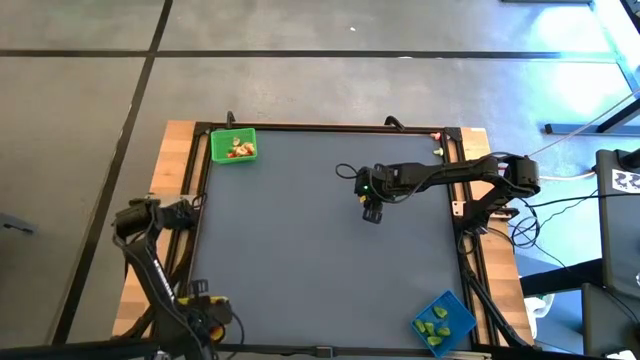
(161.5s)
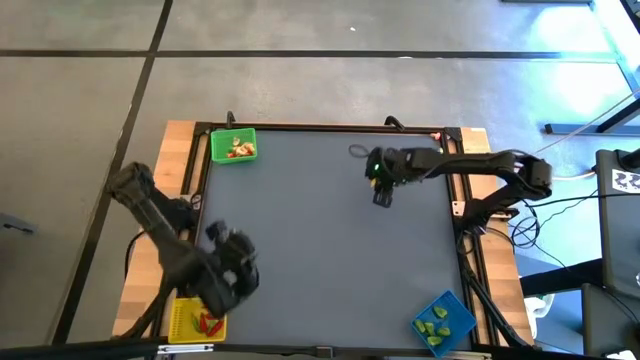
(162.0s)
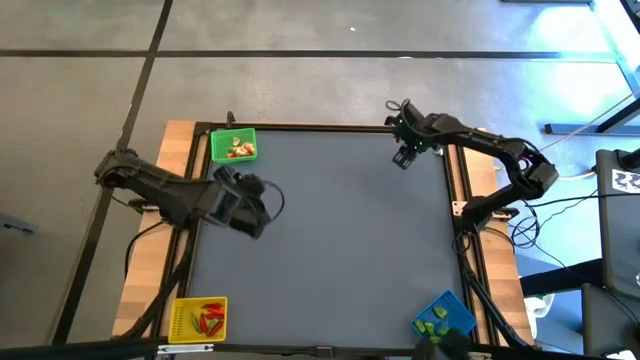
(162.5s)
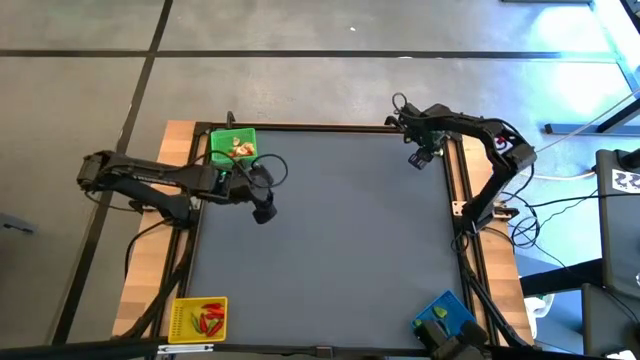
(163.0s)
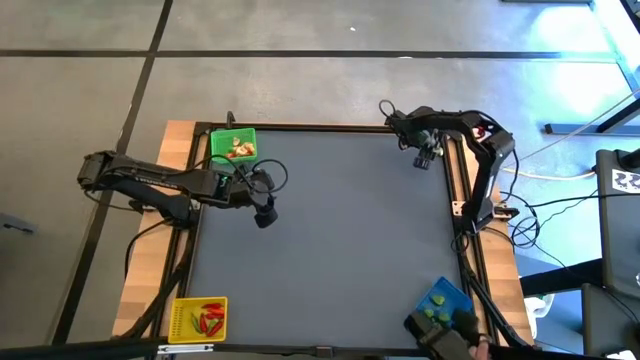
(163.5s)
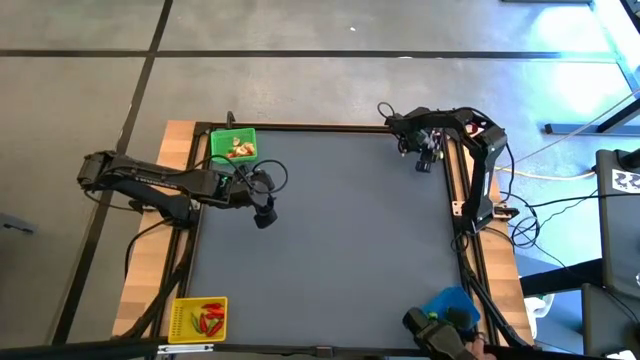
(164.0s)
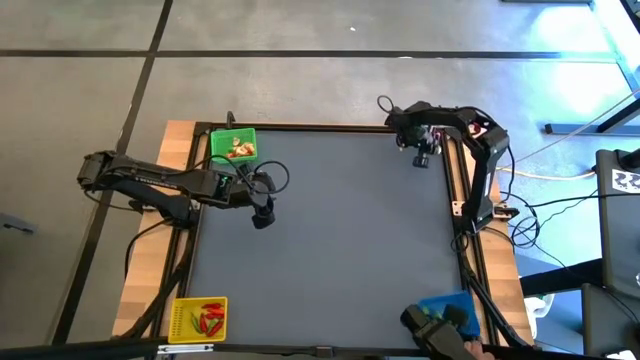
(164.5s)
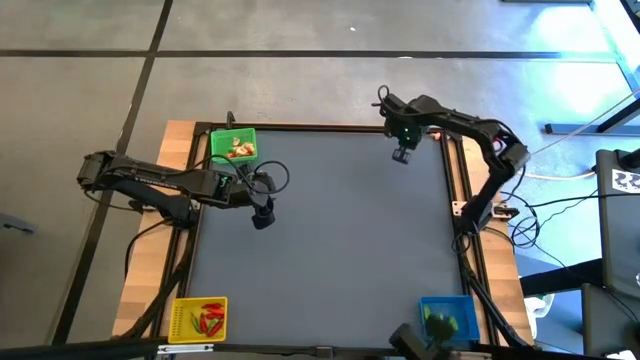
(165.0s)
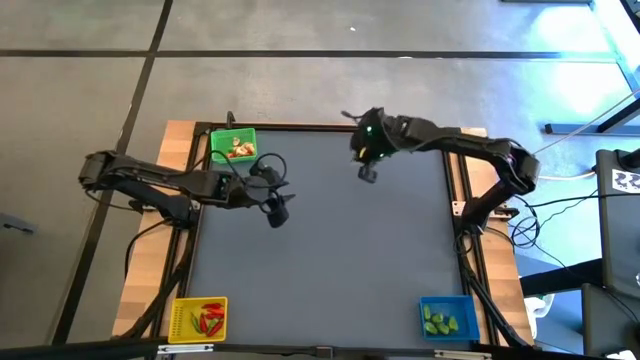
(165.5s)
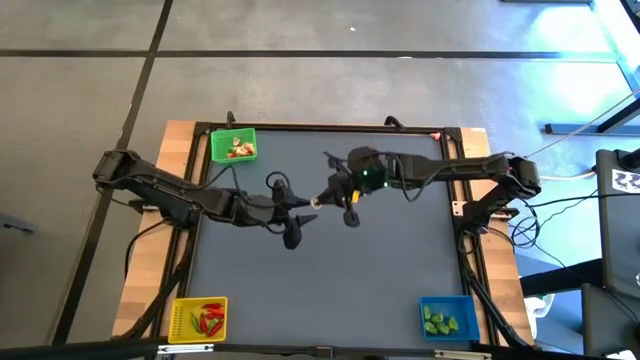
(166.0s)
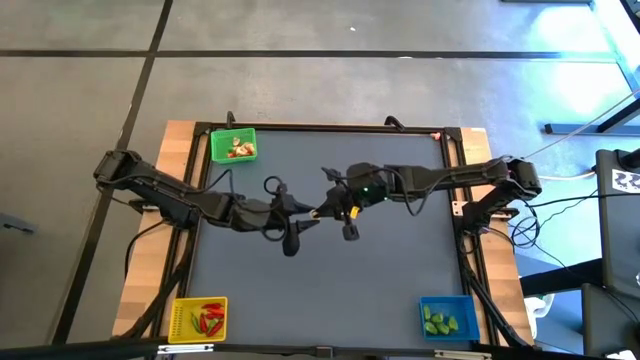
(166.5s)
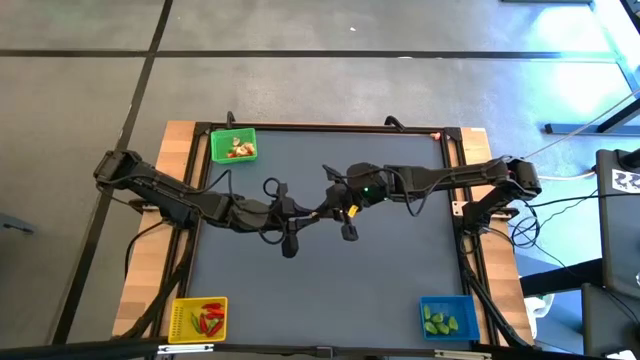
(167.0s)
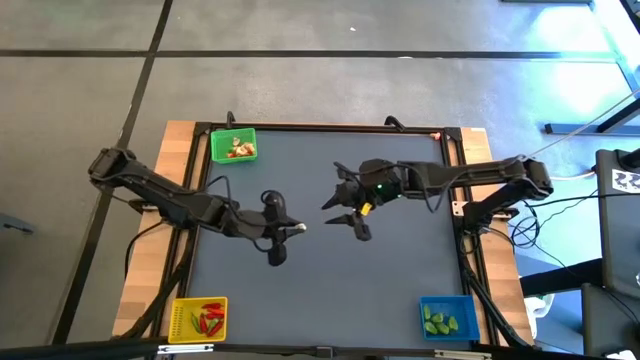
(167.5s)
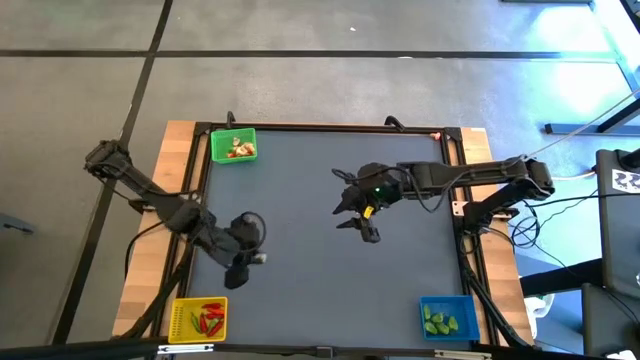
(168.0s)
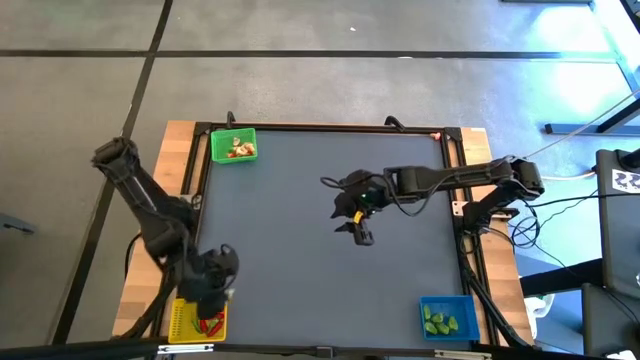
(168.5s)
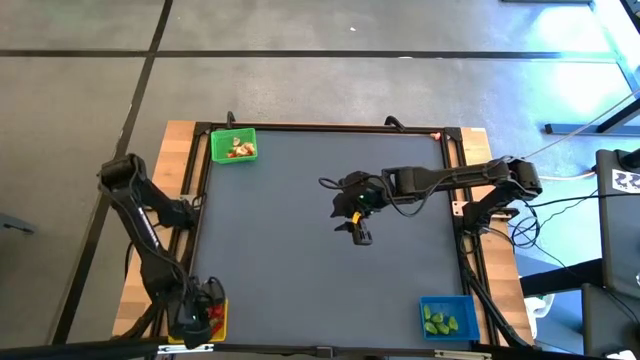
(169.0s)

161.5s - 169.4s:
Task: Sort produce into baskets
Put the green mushroom into the yellow bin

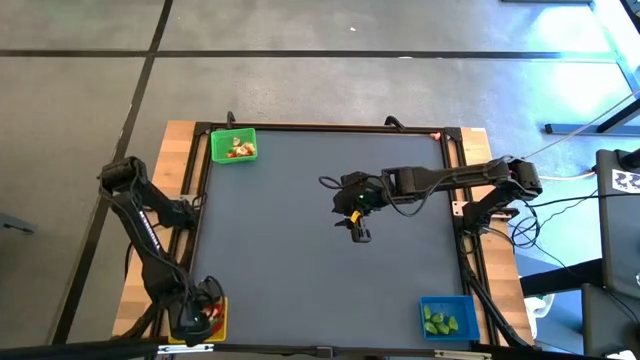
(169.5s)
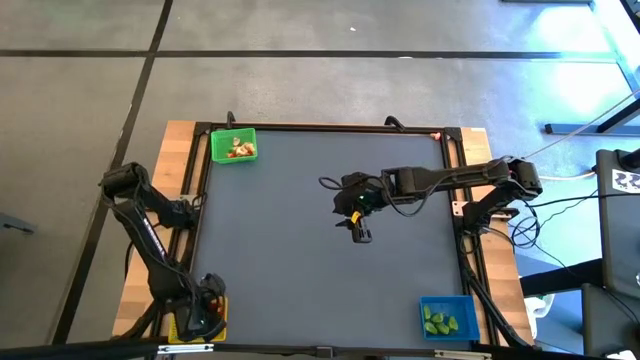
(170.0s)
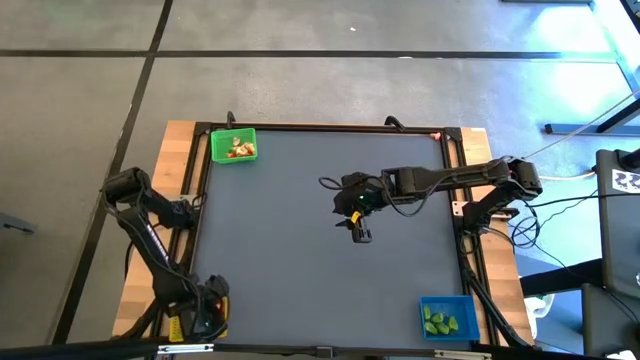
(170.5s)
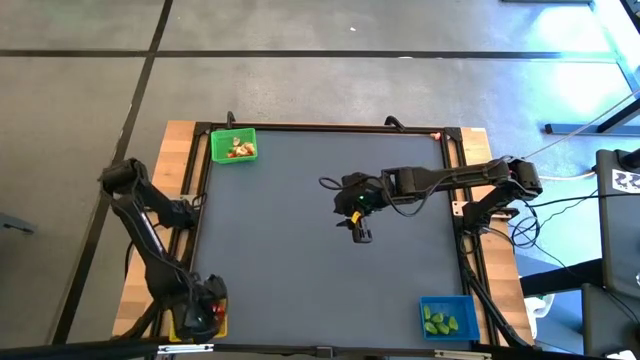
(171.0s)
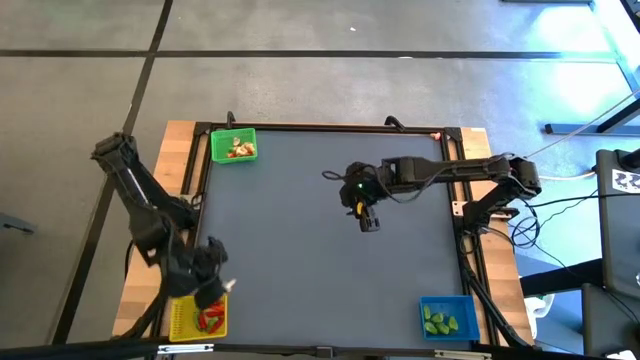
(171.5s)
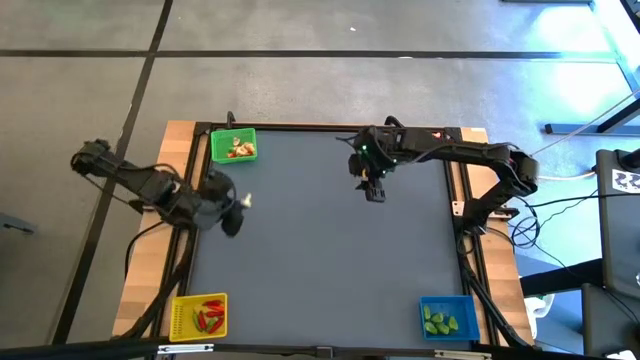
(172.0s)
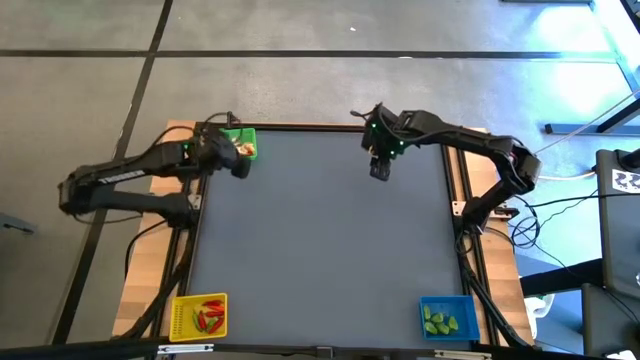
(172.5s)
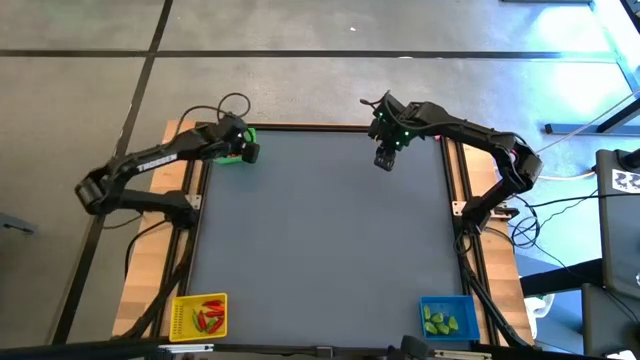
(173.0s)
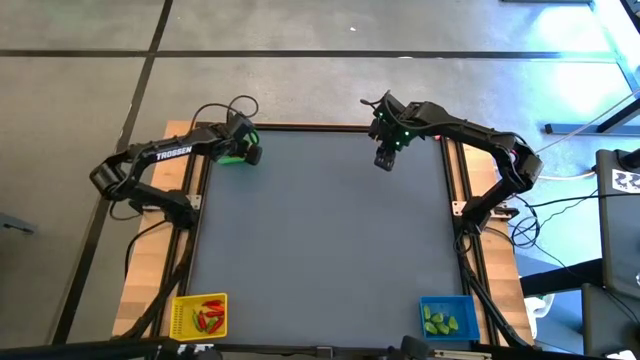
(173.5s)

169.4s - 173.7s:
Put the green mushroom into the yellow bin

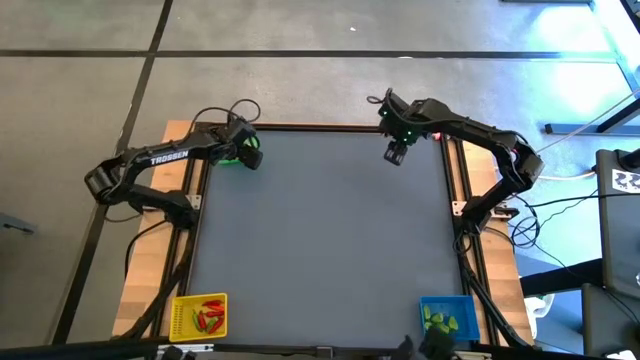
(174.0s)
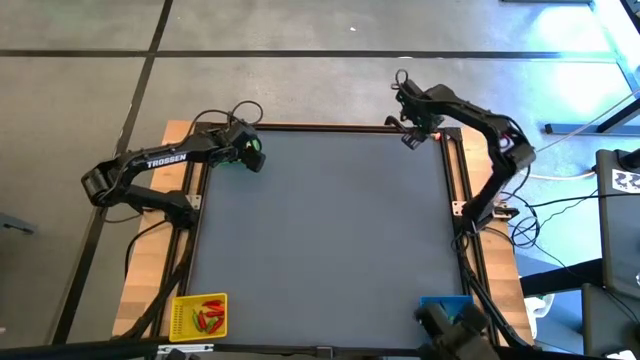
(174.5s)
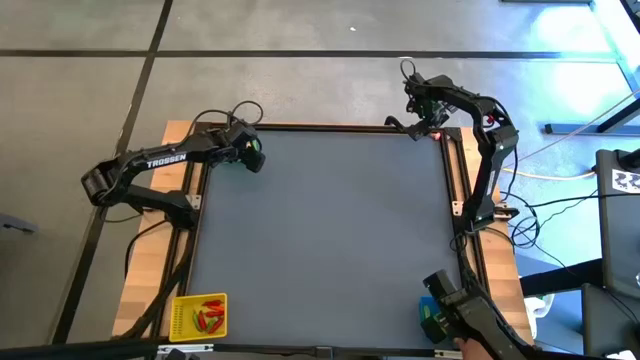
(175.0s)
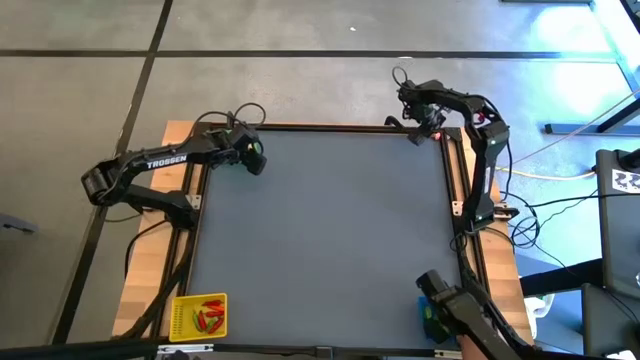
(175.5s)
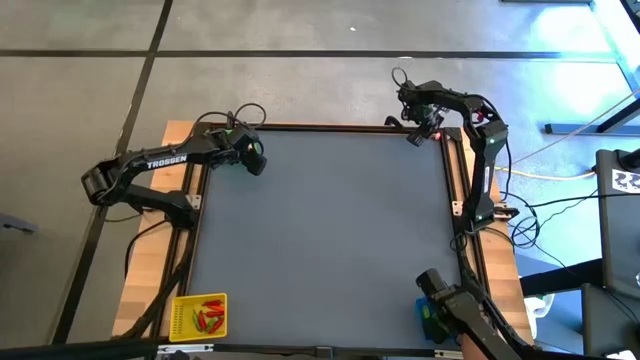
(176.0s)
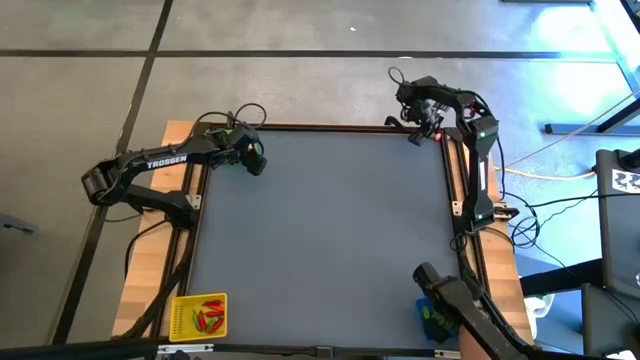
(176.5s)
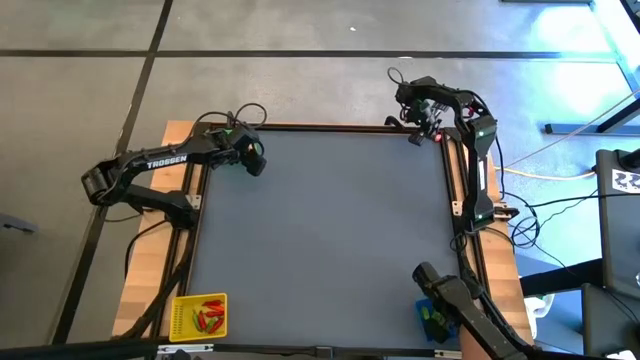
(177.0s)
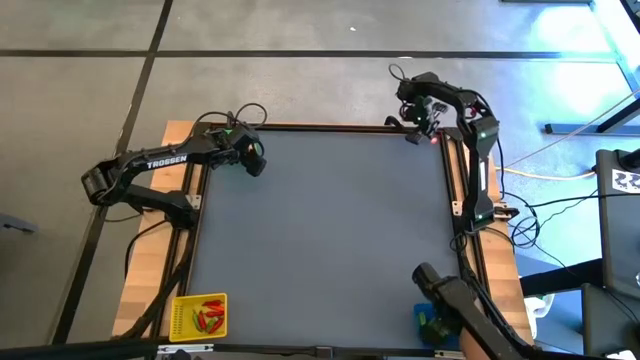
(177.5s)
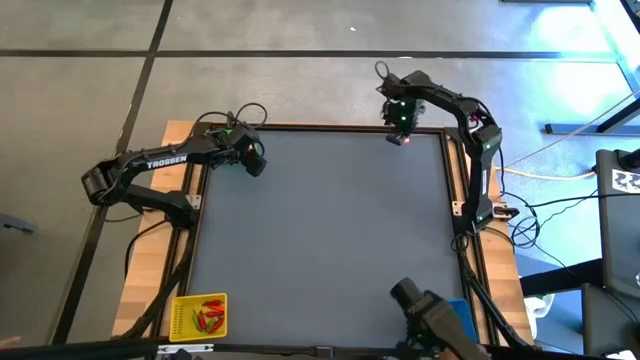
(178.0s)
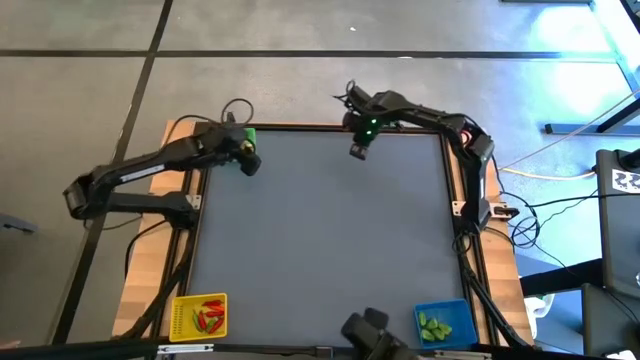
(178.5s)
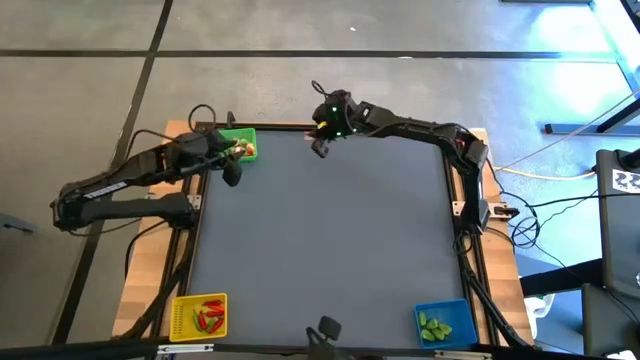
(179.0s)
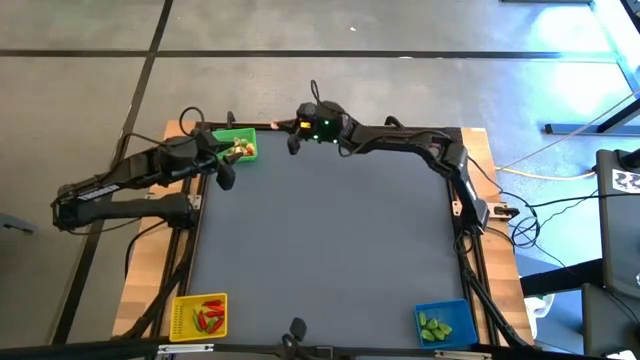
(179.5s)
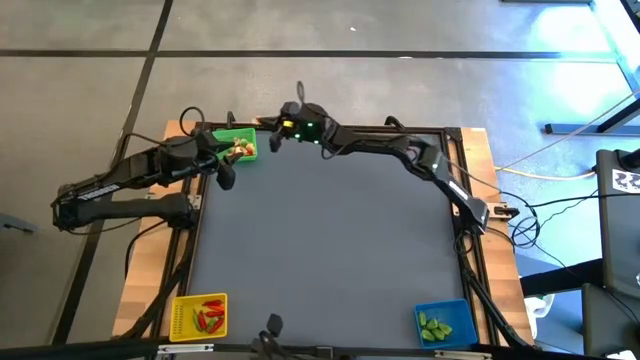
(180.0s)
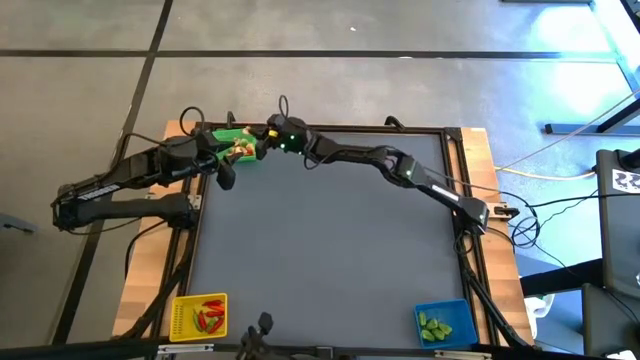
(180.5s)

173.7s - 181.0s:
Put the red mushroom into the green bin
